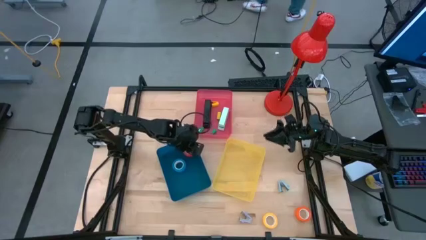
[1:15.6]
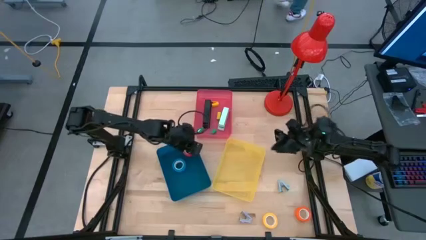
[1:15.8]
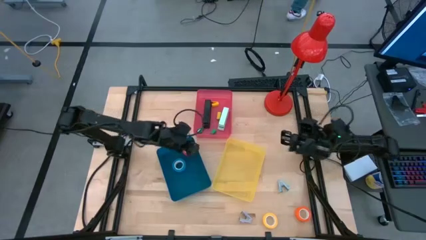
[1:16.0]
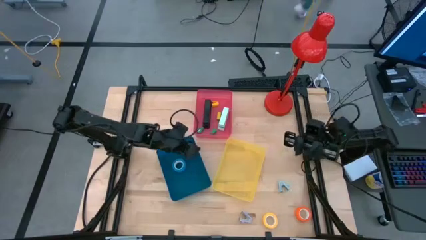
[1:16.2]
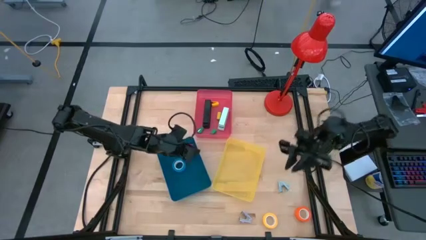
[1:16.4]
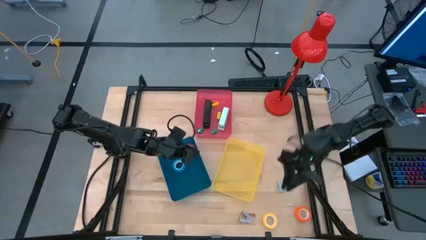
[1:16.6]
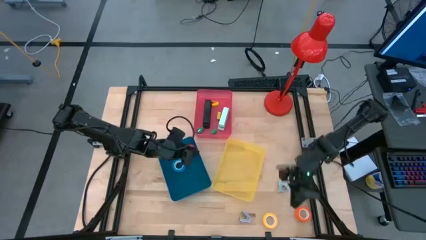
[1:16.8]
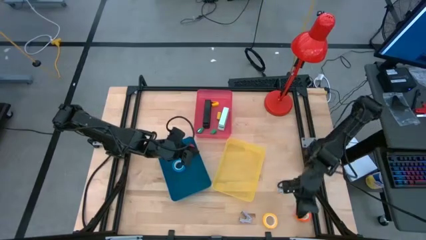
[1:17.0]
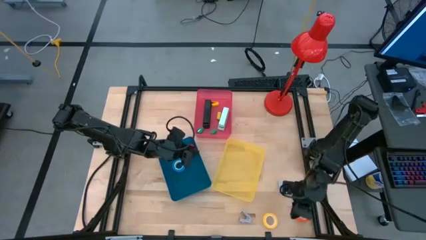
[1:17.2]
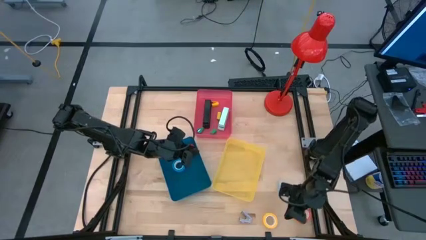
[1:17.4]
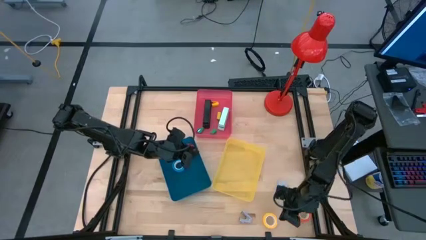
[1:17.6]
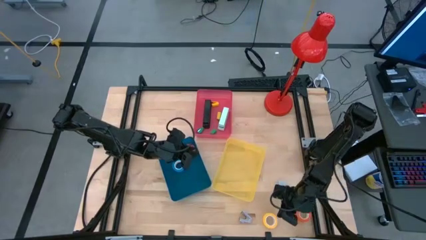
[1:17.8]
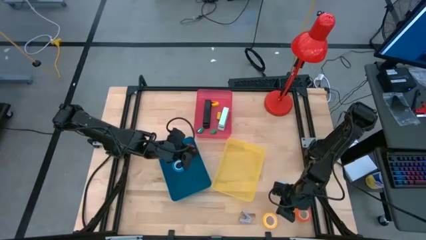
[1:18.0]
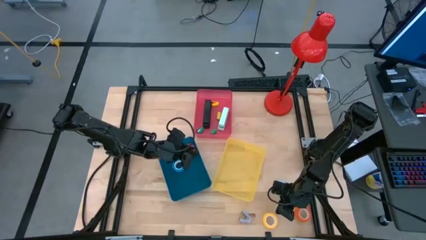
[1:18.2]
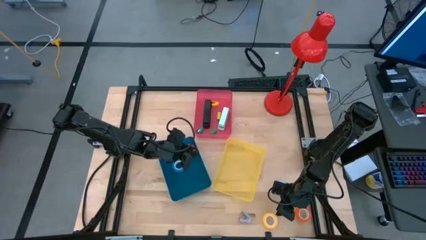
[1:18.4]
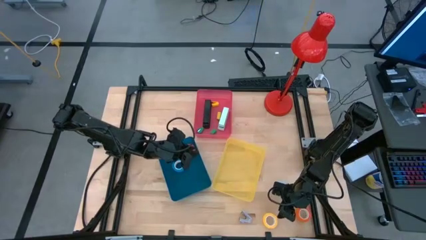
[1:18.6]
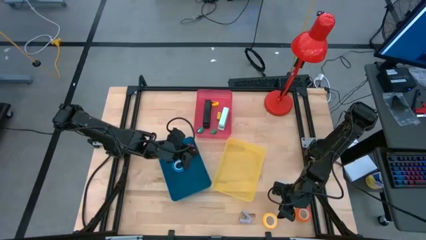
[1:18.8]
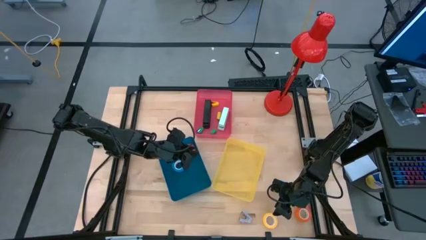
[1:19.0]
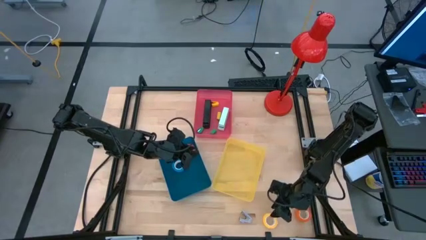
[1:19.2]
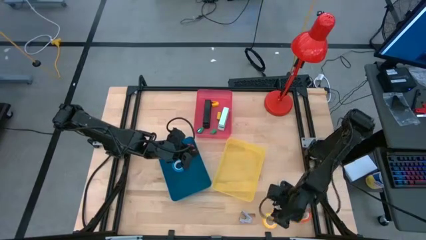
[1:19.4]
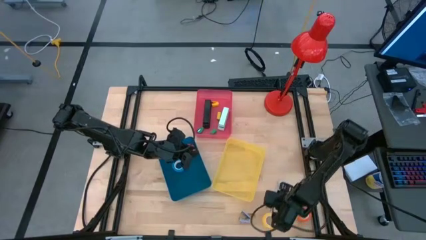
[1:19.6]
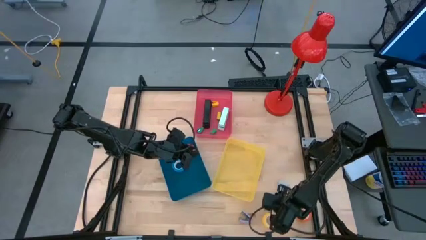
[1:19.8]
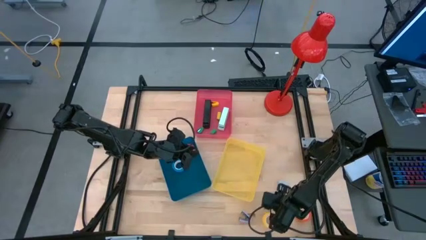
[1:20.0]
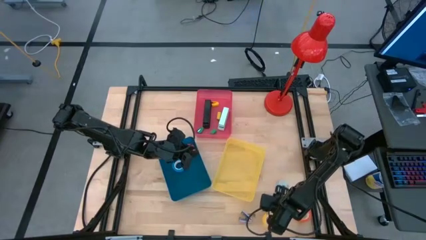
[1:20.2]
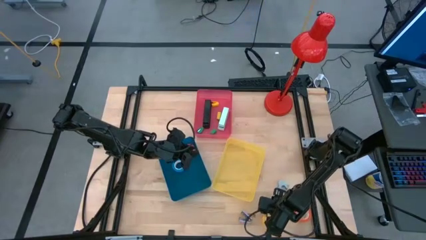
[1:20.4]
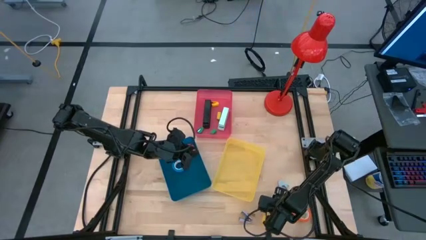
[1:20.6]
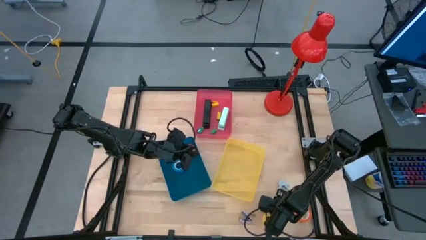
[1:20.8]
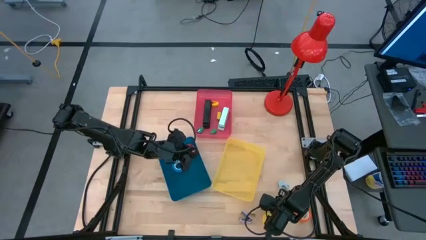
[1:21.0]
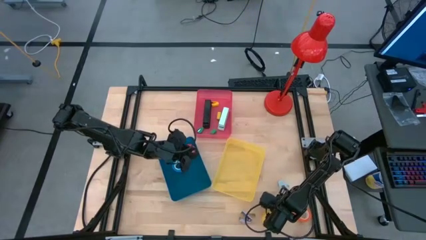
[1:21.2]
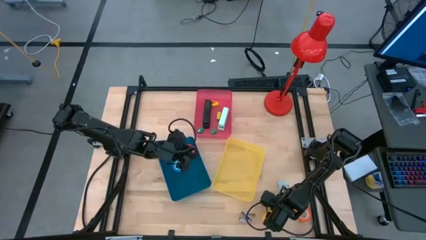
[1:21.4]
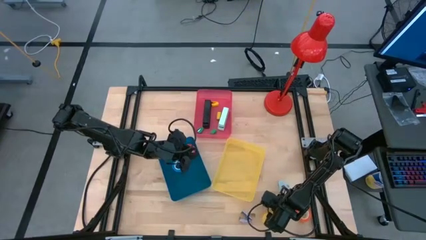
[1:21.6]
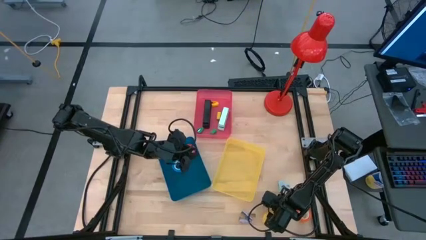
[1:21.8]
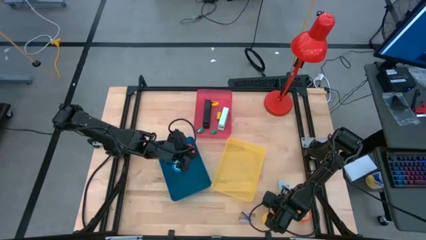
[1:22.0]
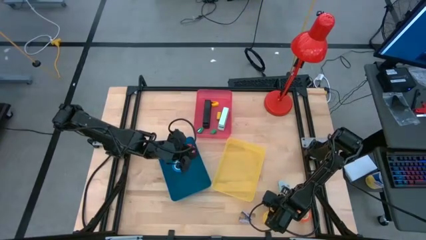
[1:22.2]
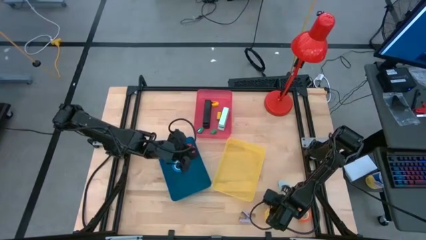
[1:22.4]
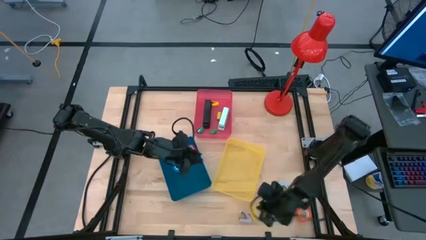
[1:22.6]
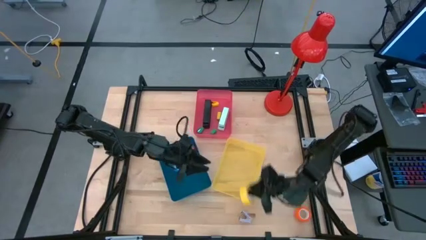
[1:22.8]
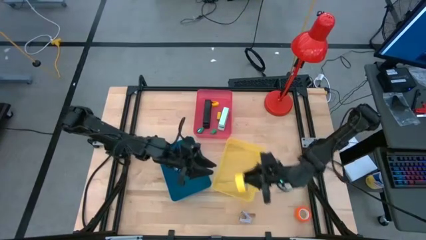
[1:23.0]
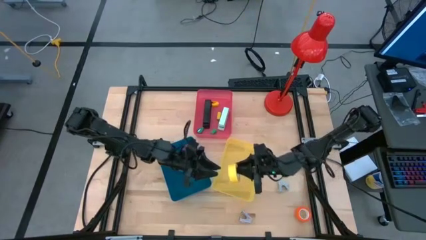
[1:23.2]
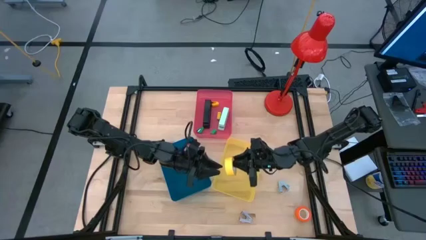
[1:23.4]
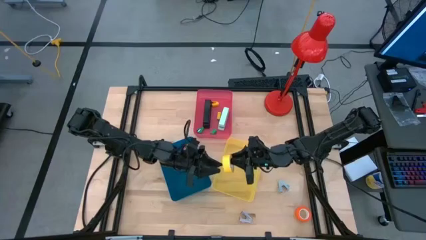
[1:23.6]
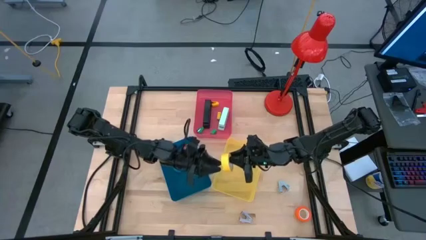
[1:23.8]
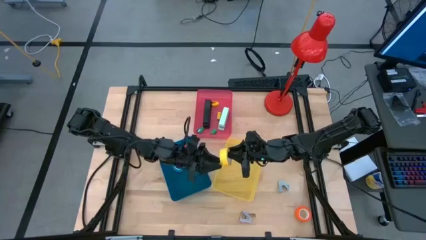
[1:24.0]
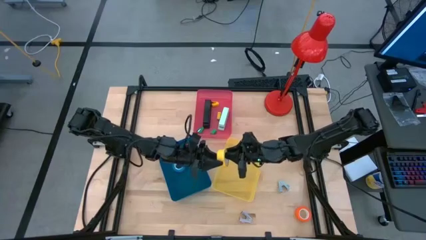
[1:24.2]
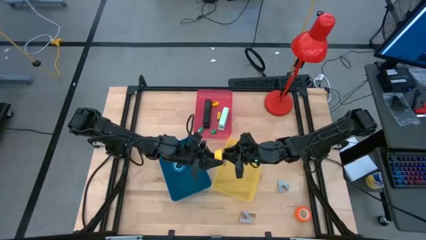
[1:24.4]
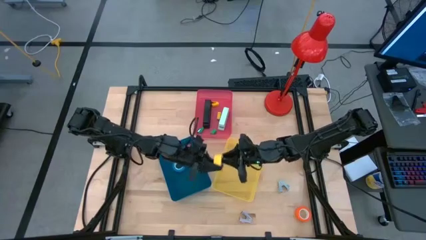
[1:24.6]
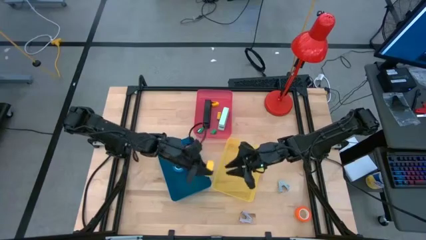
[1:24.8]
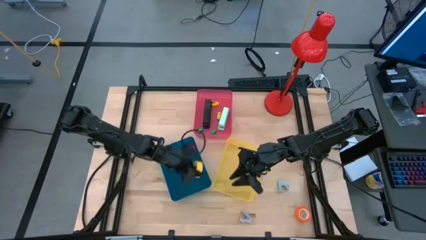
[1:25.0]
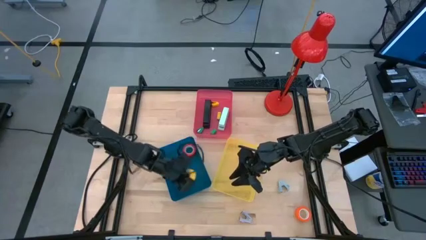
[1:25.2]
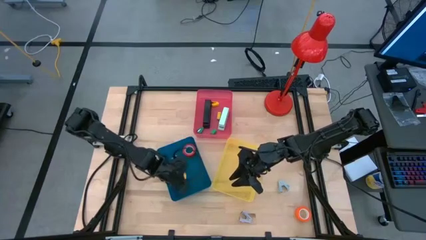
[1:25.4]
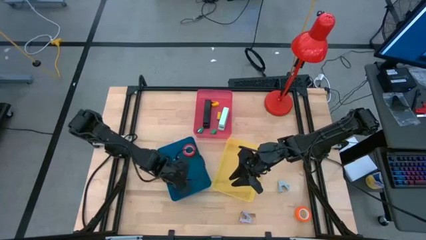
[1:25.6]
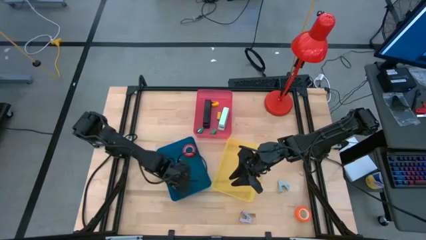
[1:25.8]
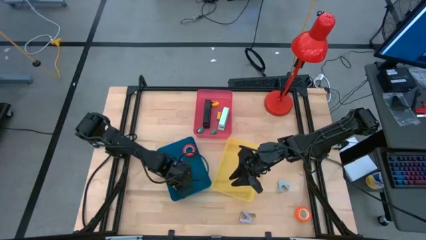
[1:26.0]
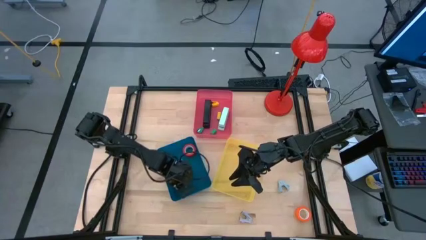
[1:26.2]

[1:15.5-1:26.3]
Task: Pick and place Stapler, Stapler remover, tape
Put the yellow tape into the blue bin

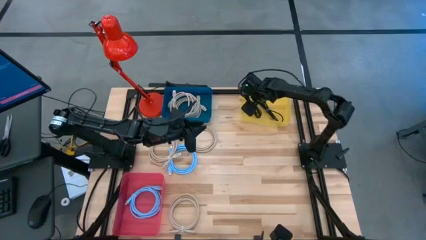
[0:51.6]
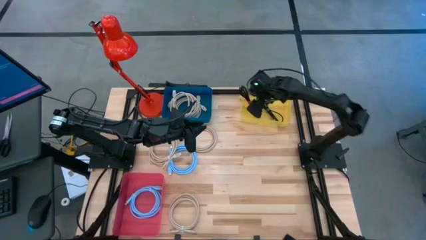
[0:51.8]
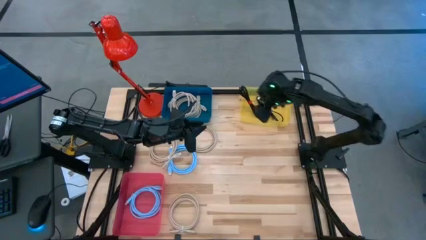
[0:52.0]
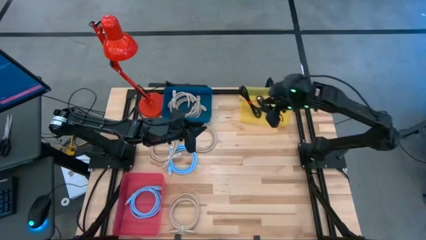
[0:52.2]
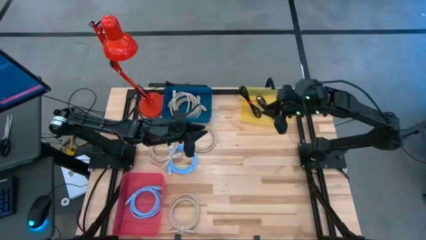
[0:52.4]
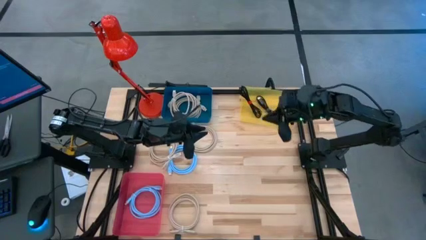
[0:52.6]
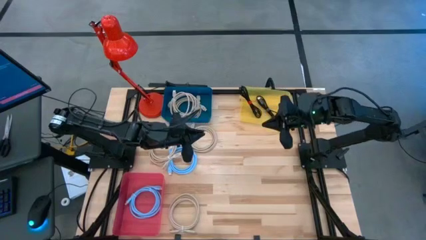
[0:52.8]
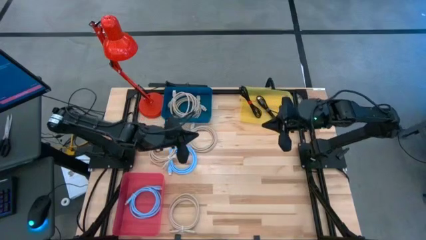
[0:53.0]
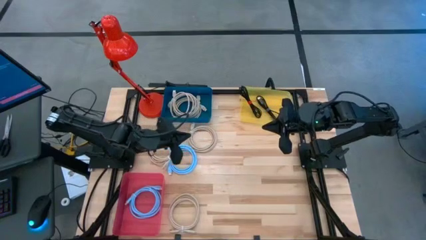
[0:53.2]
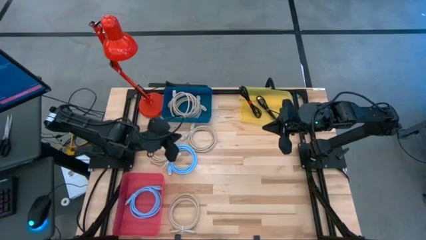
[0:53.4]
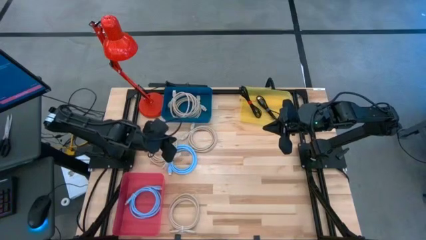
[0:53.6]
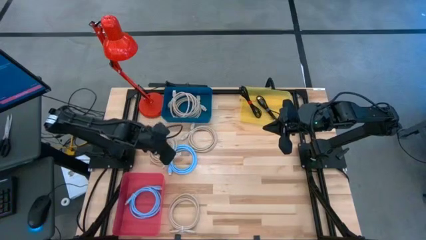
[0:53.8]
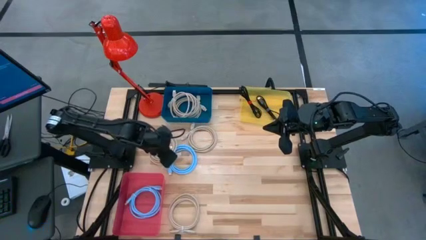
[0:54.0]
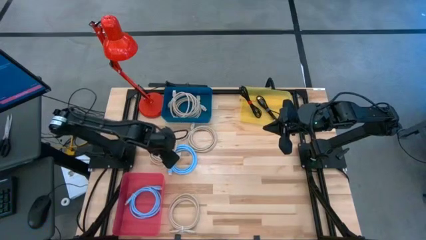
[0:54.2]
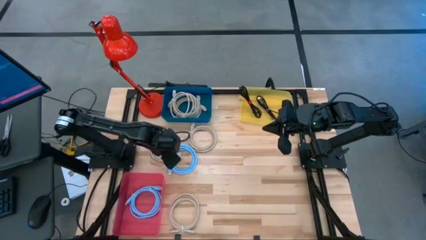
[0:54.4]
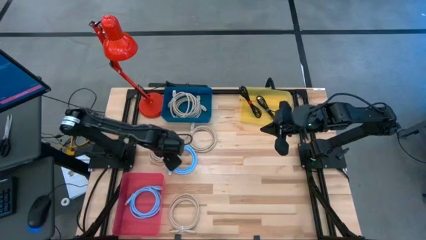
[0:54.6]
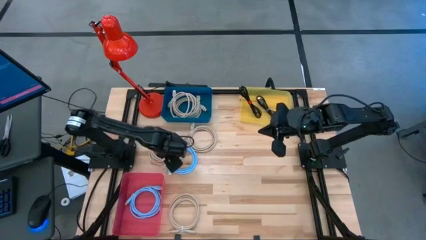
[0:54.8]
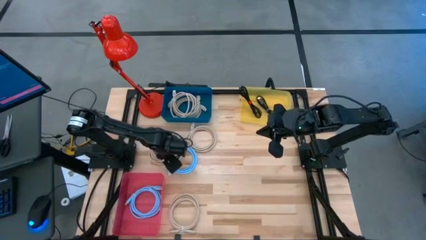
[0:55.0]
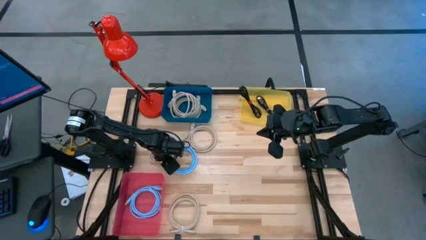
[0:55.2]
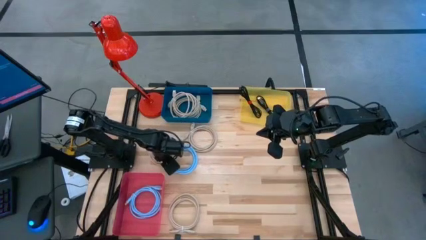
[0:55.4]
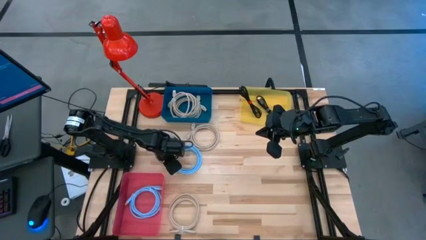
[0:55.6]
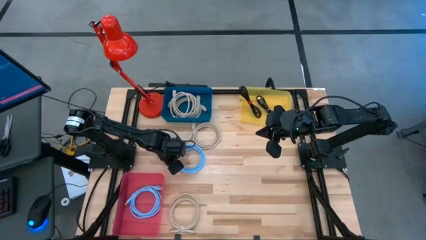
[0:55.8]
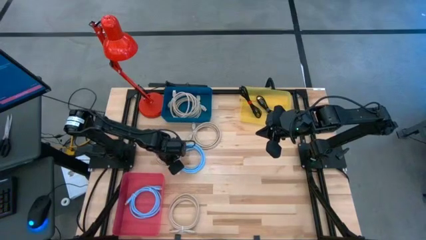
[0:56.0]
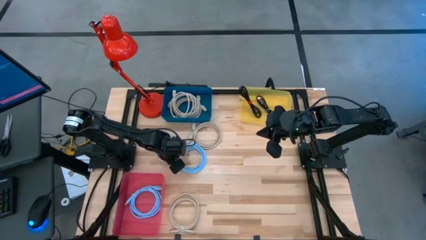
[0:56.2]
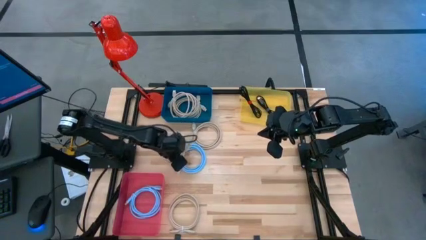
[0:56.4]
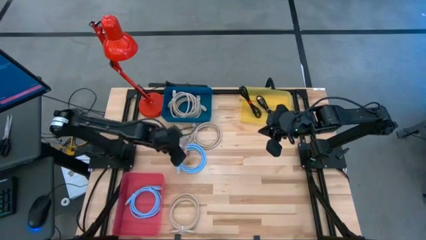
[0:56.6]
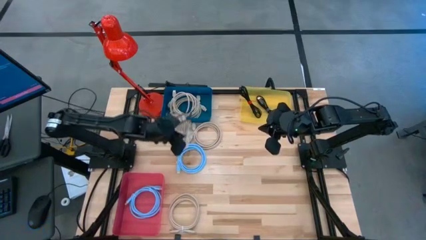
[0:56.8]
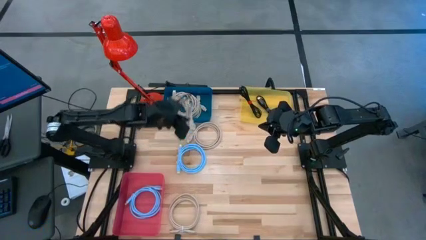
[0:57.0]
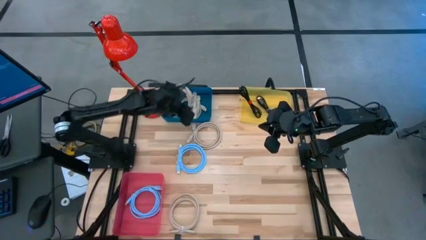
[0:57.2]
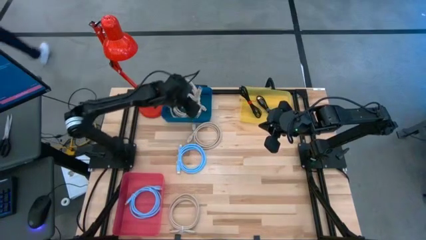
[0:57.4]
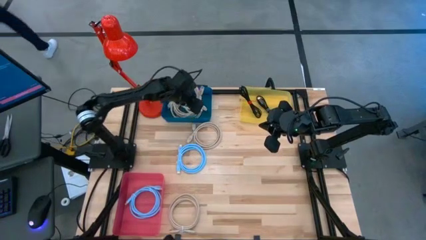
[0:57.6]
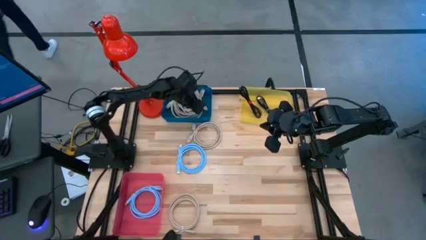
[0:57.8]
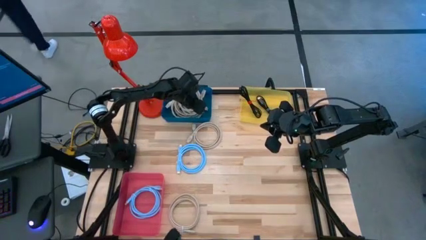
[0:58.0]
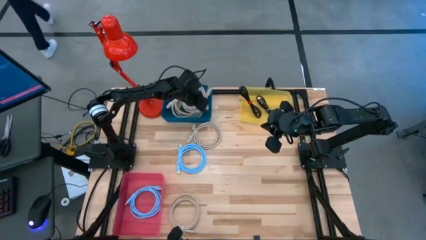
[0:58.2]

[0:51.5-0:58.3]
Task: Pick & Place USB Port
Put the brown display cable into the blue bin
